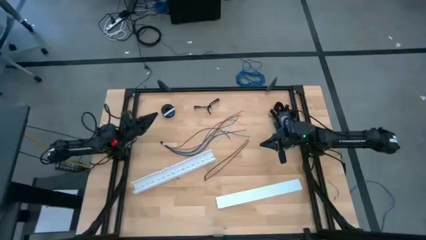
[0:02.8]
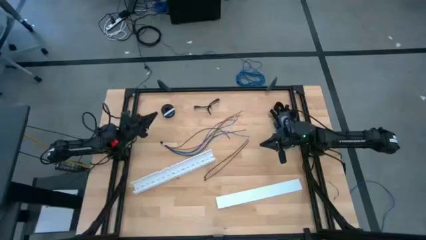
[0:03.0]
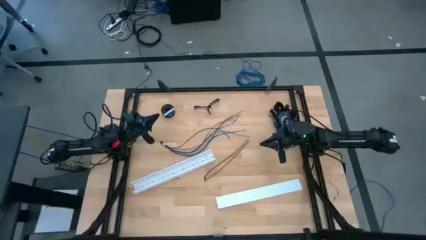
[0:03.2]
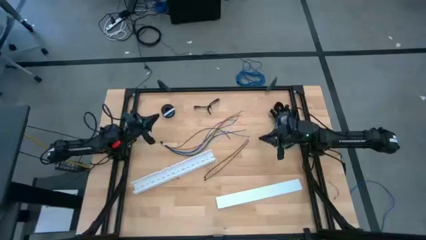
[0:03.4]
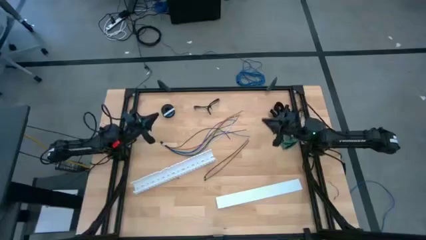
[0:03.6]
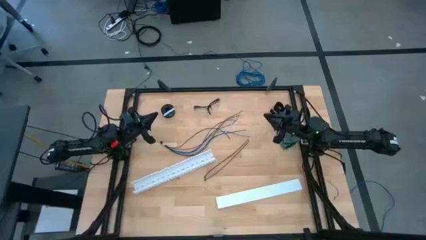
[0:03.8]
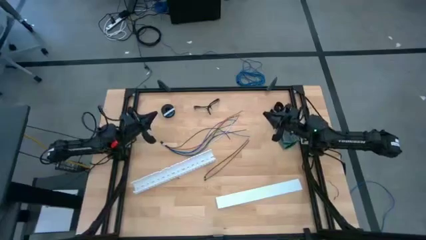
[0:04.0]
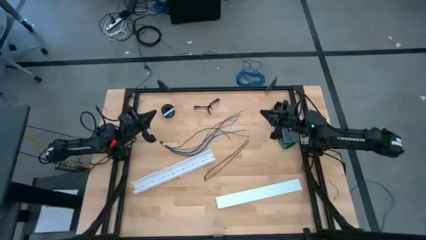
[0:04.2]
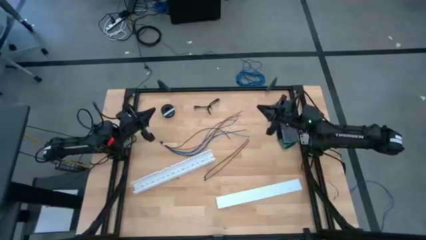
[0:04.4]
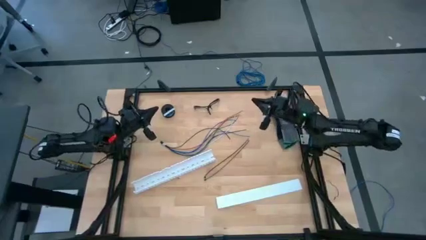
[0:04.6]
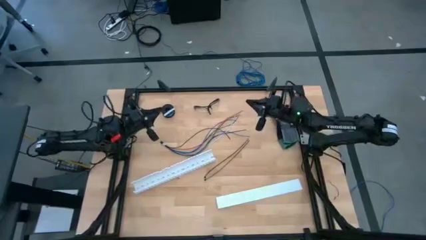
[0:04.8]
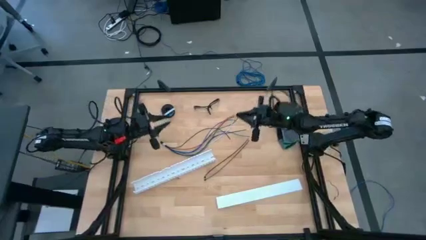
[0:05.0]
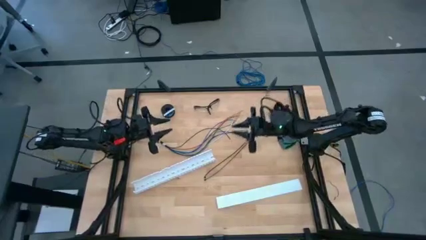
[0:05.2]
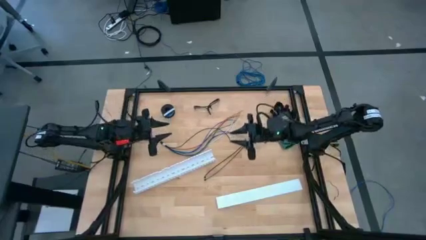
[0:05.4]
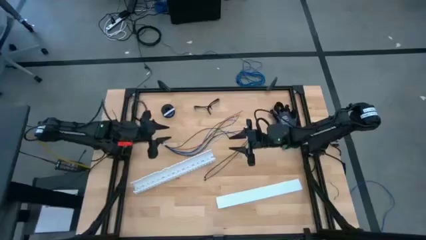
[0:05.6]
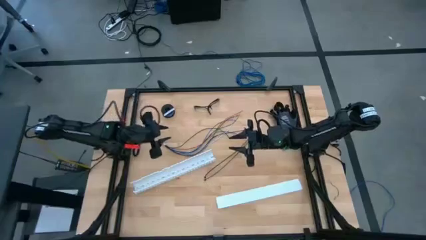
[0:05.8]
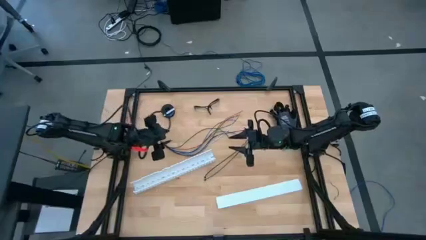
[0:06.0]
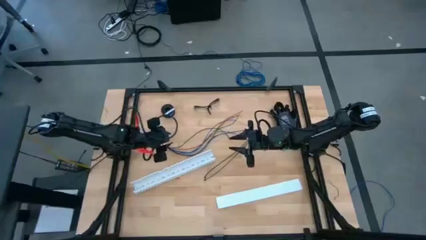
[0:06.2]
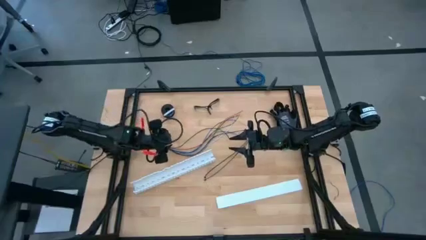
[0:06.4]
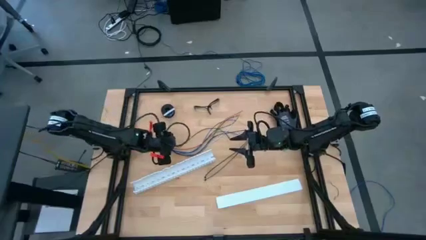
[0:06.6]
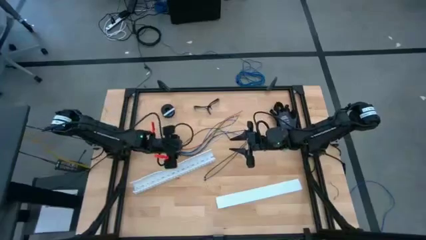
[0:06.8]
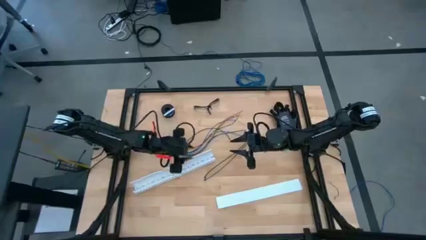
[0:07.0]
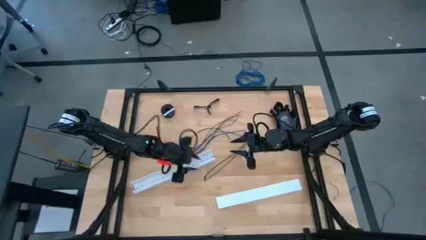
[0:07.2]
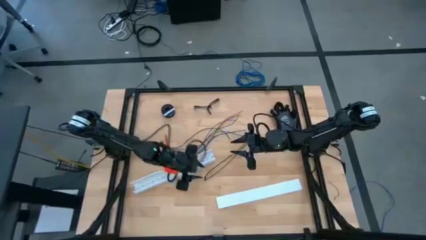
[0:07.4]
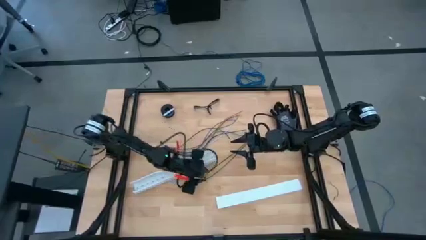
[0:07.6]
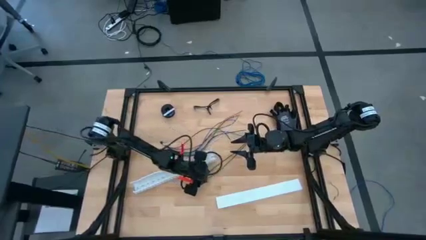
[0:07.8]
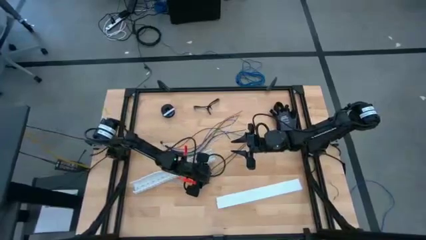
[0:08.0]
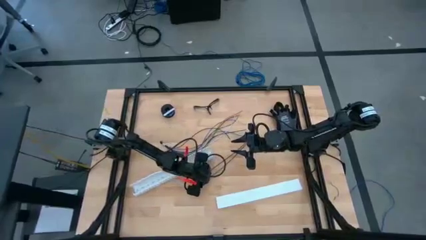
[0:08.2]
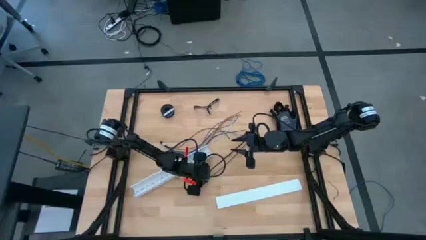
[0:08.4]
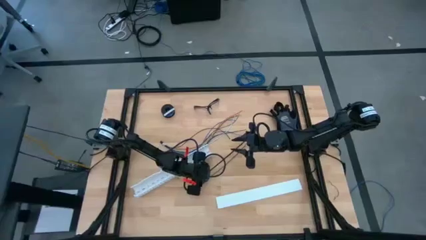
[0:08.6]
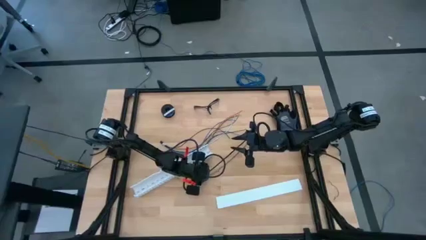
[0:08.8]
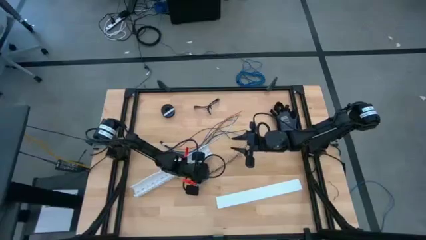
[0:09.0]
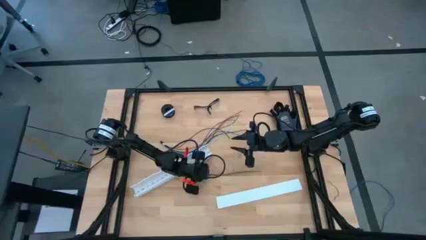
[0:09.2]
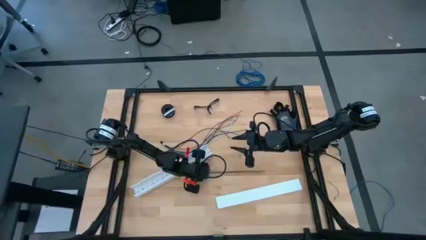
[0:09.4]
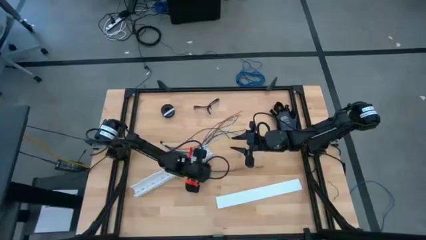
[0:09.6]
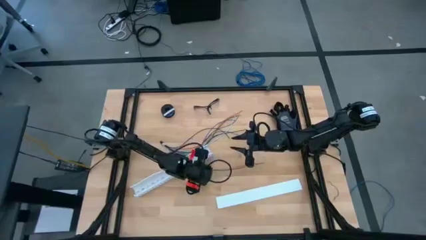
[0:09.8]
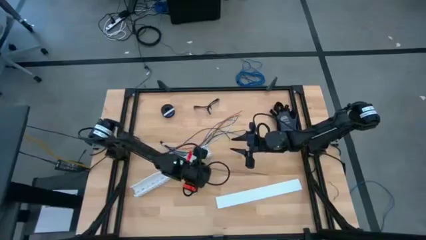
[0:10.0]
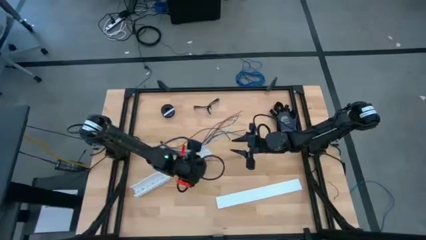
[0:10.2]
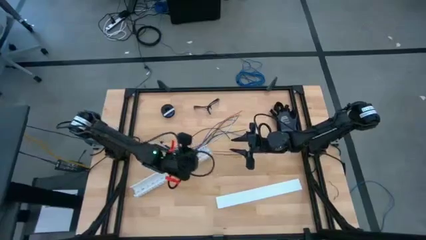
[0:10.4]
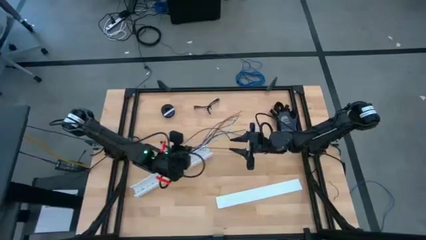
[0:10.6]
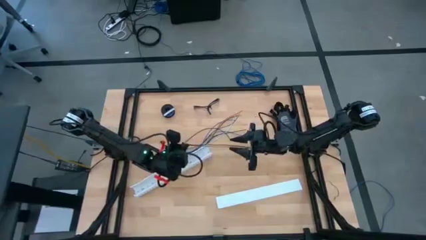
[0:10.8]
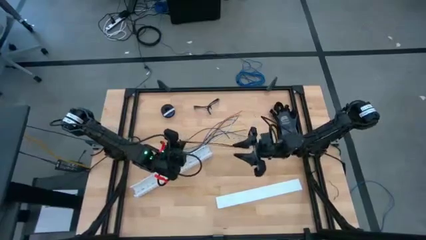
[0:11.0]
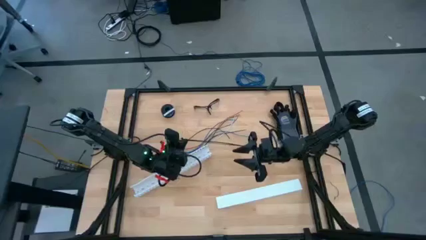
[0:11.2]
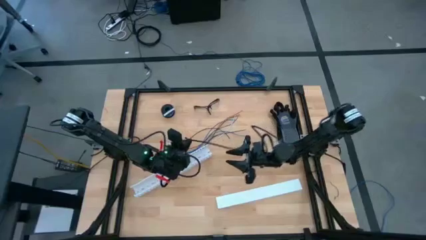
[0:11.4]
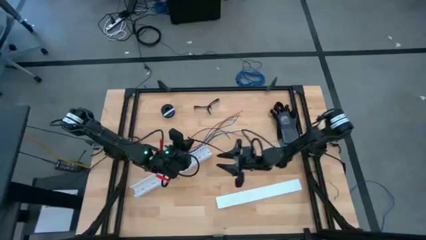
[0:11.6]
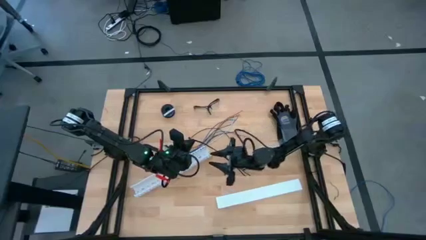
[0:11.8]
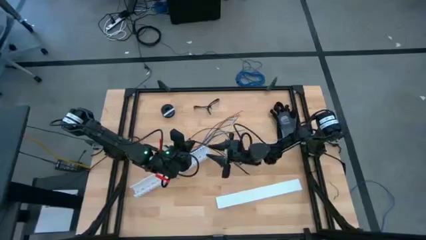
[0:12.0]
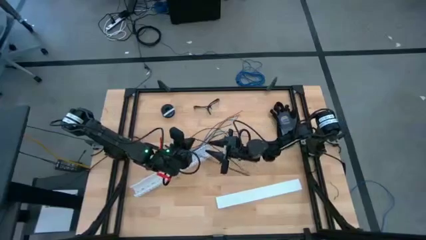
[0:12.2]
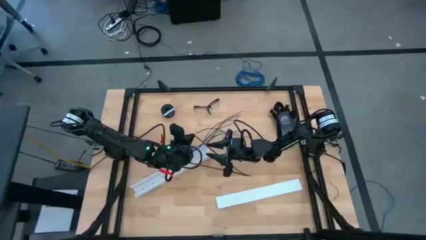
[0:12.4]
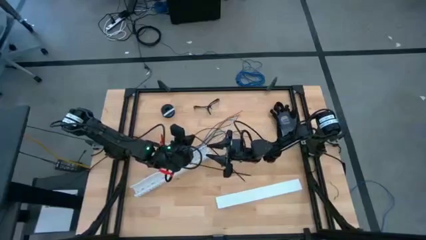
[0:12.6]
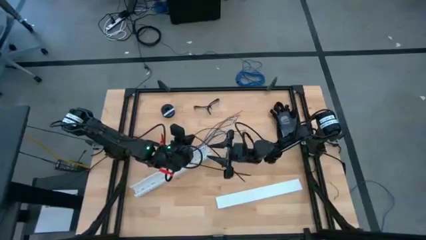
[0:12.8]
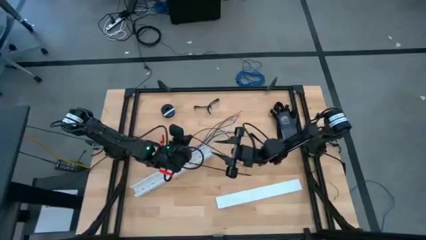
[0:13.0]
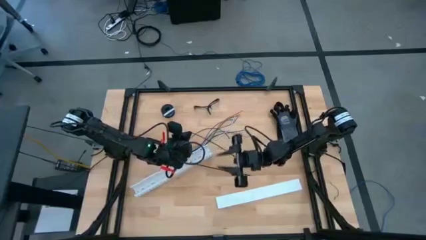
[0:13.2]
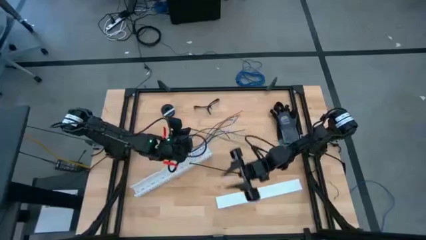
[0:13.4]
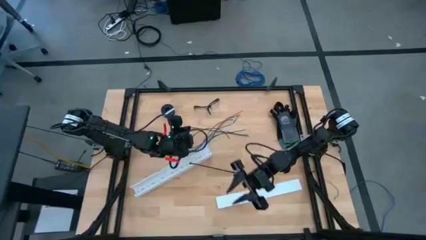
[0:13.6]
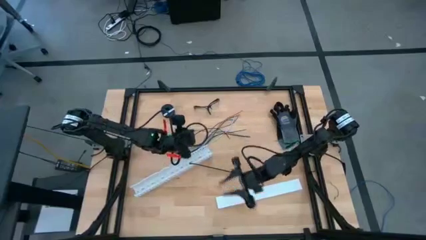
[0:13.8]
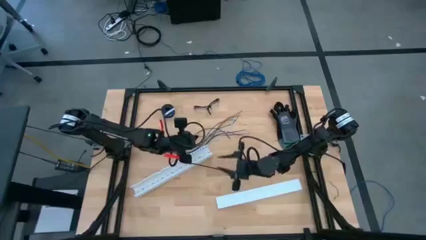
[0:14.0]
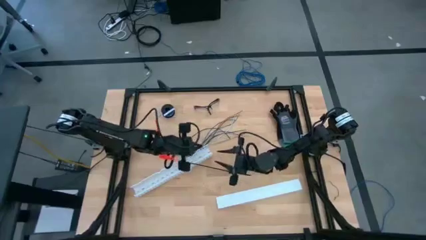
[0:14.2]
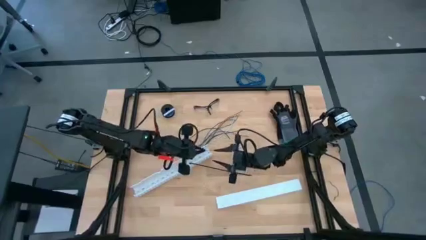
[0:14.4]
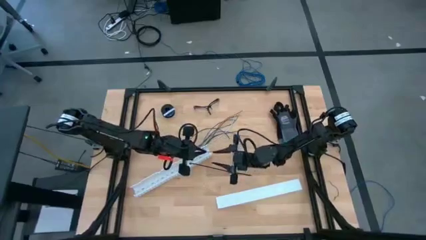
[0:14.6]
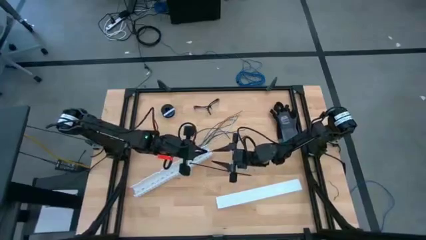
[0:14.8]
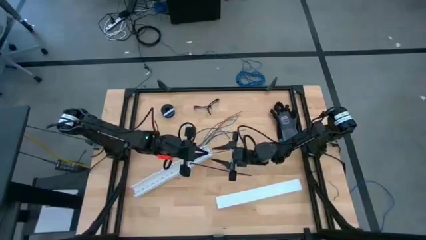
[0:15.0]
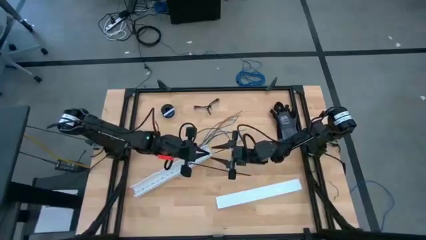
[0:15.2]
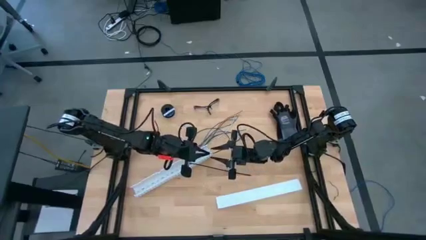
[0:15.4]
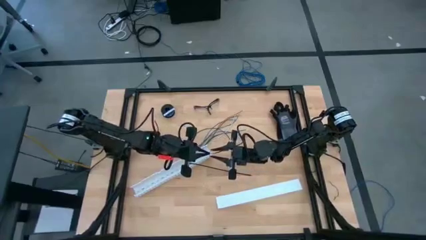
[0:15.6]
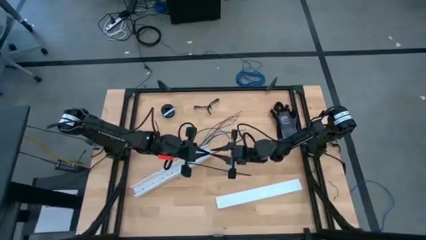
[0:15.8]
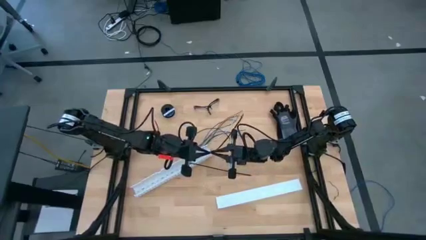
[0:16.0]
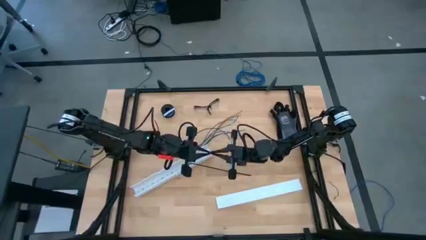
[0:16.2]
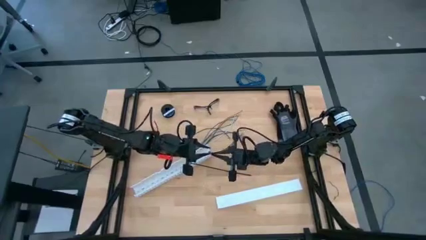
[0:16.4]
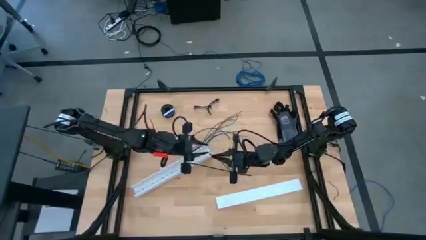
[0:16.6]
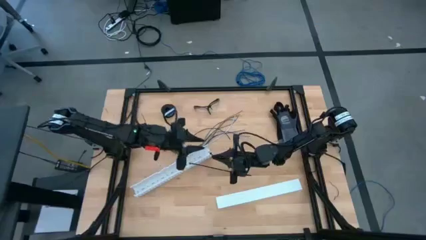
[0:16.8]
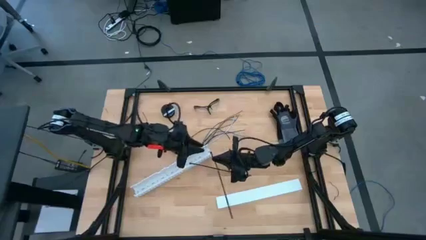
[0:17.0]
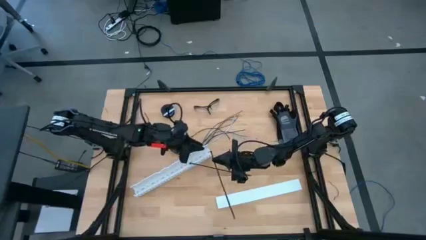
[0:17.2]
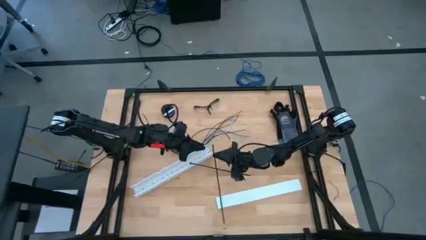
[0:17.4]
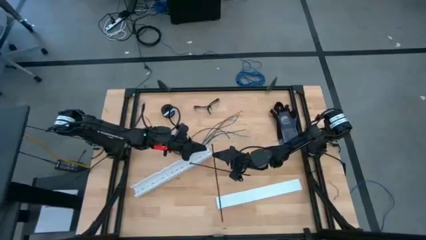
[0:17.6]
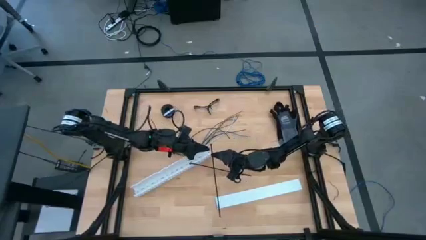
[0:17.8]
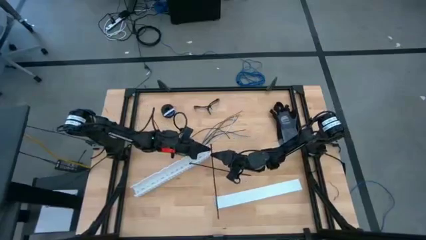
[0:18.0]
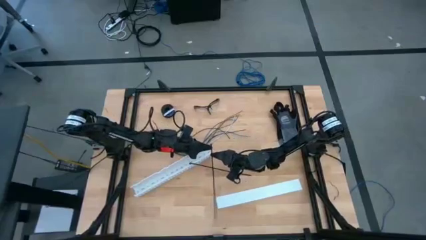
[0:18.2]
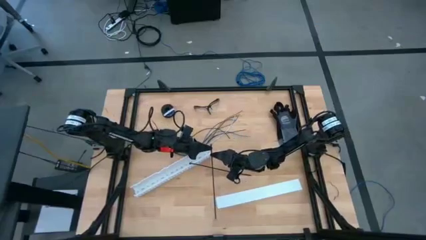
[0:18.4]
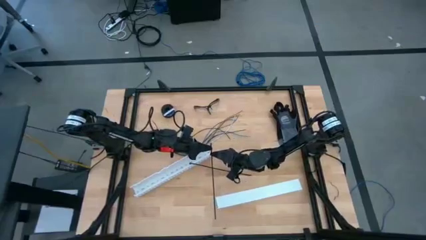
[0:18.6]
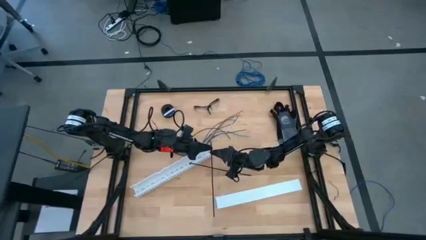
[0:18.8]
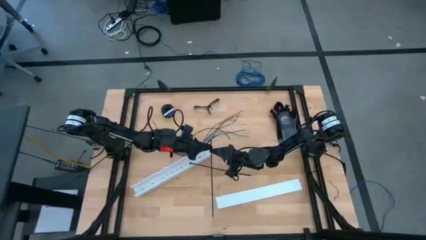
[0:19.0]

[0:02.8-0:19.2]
Task: Ziptie cables
Insert the black zip tie into the locking head
